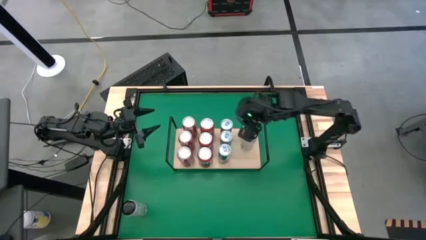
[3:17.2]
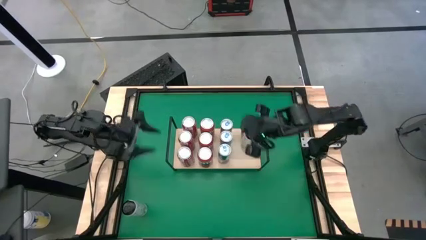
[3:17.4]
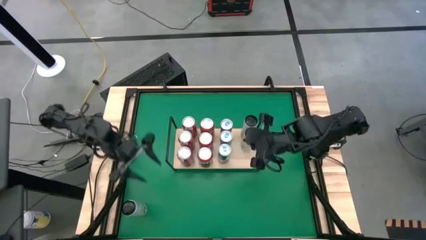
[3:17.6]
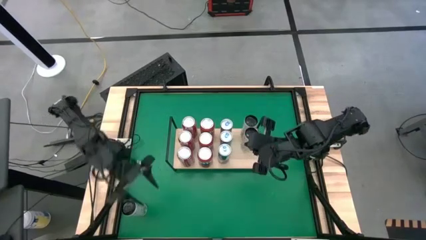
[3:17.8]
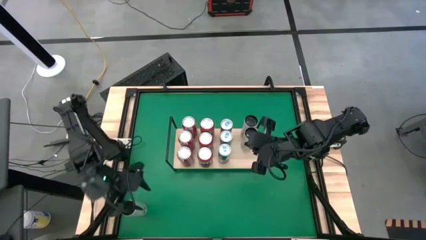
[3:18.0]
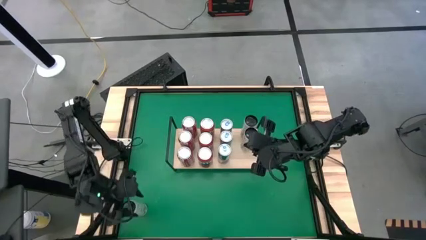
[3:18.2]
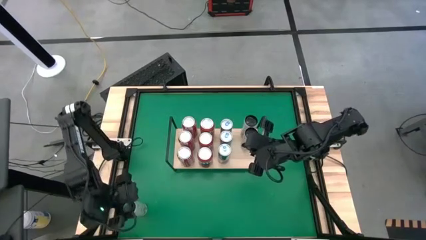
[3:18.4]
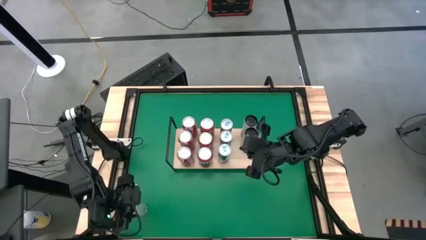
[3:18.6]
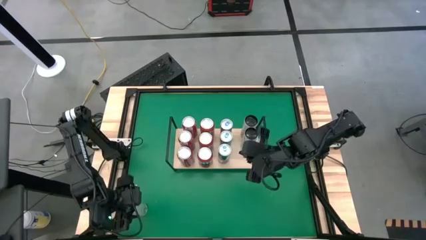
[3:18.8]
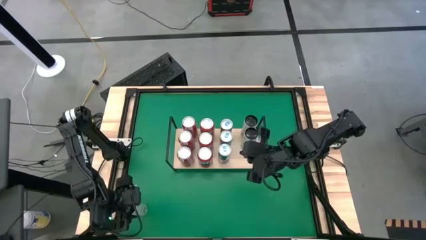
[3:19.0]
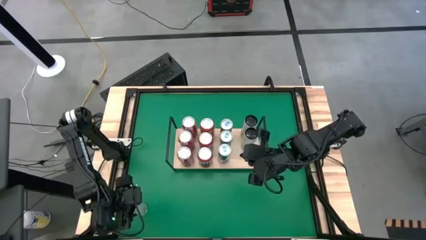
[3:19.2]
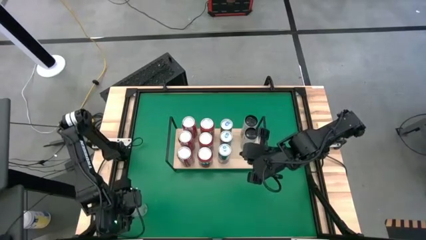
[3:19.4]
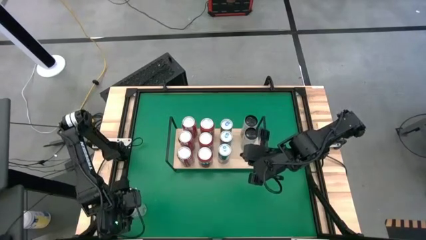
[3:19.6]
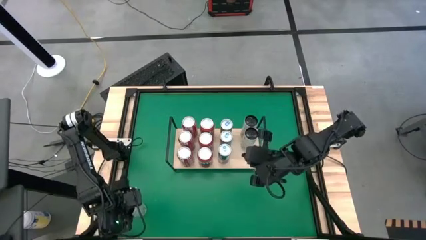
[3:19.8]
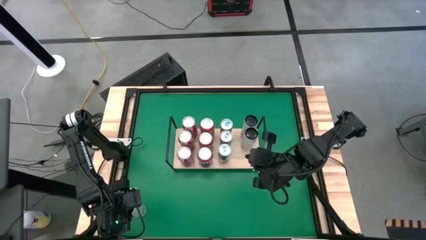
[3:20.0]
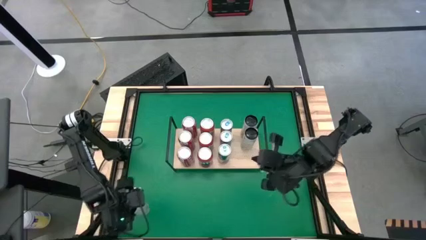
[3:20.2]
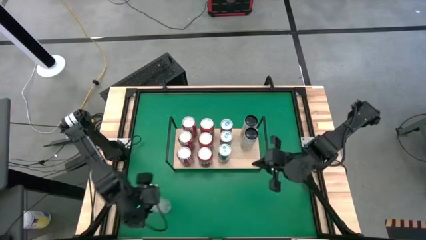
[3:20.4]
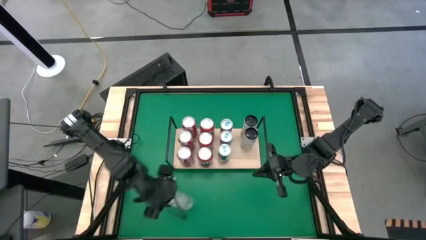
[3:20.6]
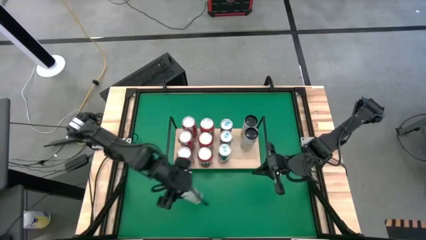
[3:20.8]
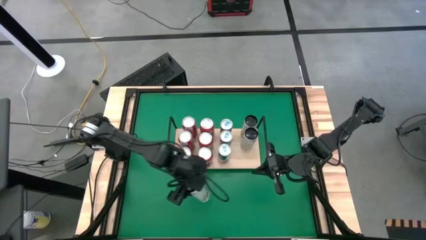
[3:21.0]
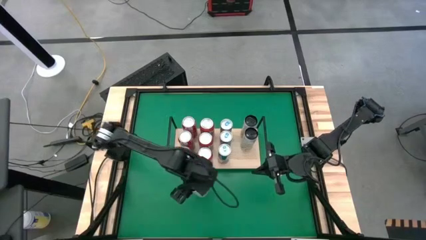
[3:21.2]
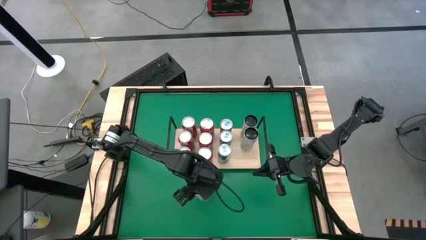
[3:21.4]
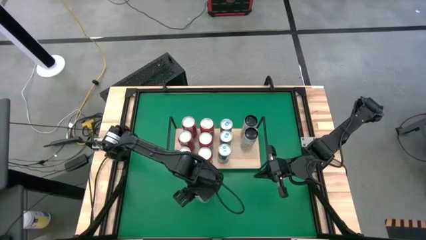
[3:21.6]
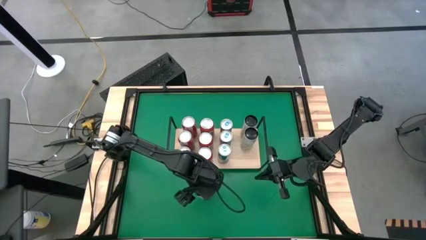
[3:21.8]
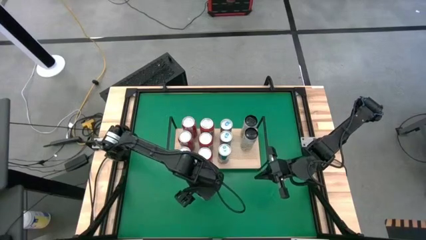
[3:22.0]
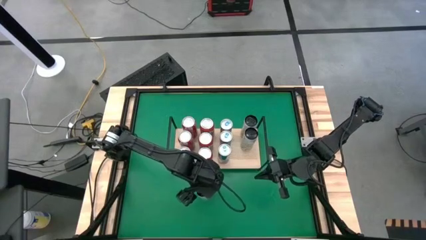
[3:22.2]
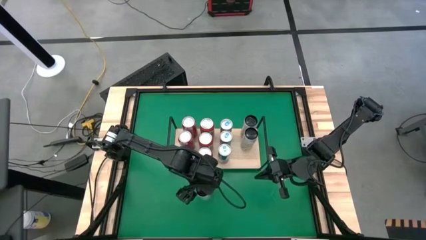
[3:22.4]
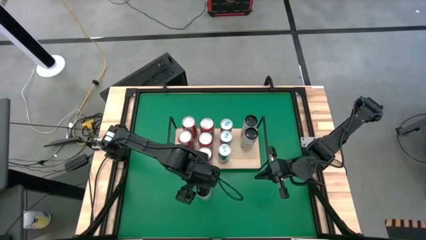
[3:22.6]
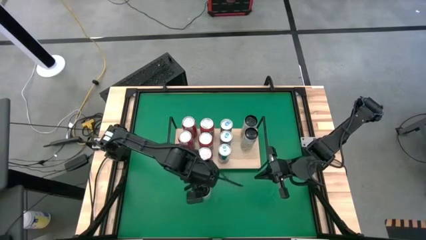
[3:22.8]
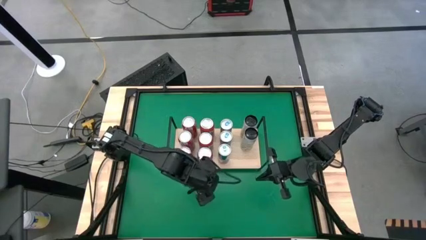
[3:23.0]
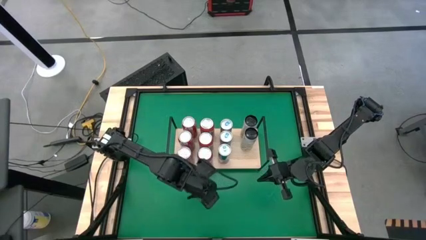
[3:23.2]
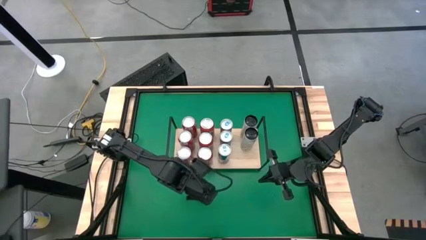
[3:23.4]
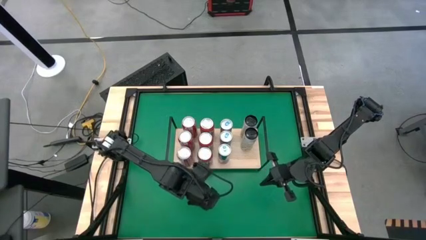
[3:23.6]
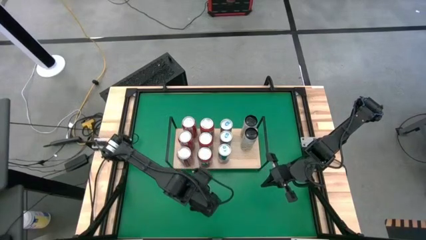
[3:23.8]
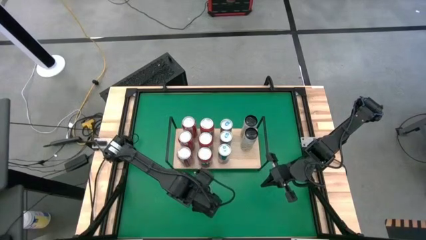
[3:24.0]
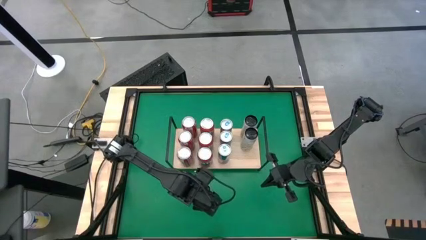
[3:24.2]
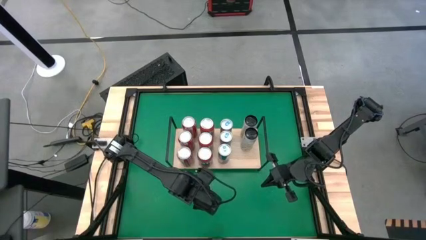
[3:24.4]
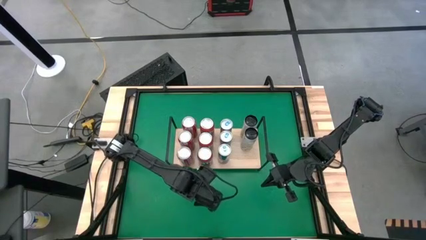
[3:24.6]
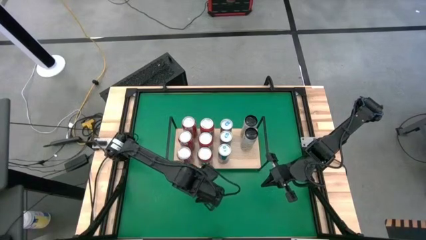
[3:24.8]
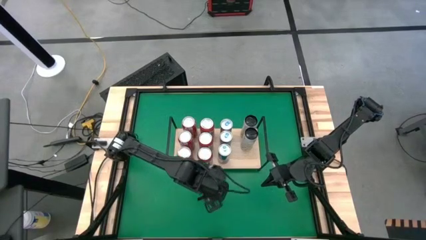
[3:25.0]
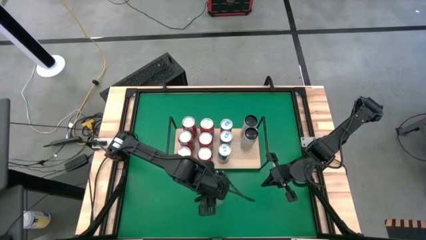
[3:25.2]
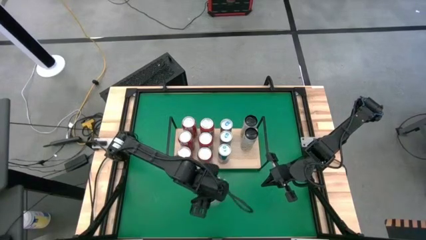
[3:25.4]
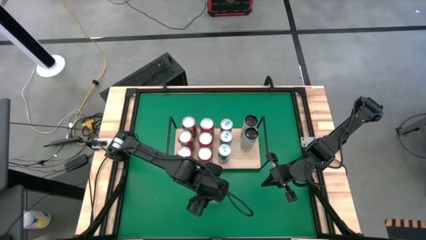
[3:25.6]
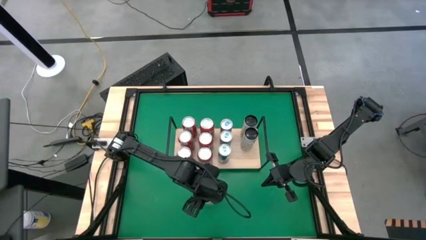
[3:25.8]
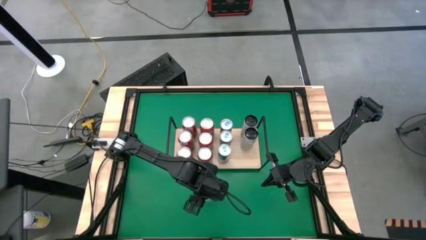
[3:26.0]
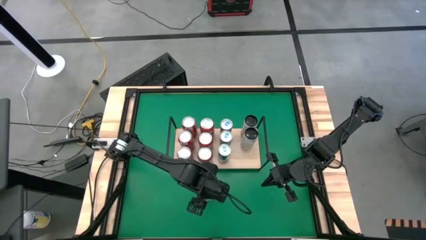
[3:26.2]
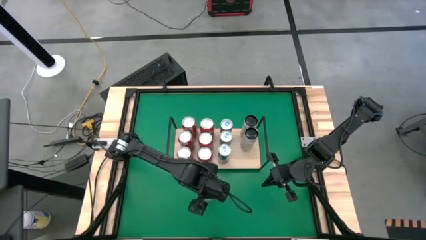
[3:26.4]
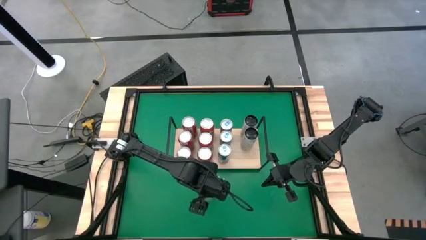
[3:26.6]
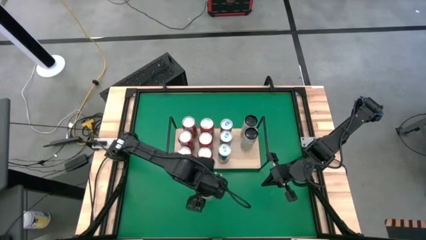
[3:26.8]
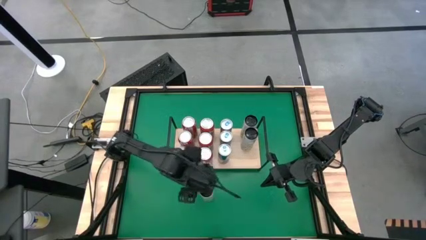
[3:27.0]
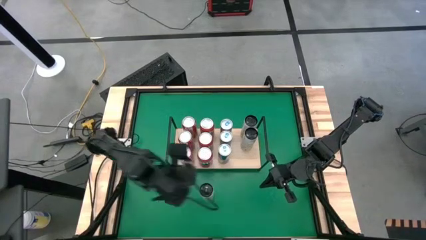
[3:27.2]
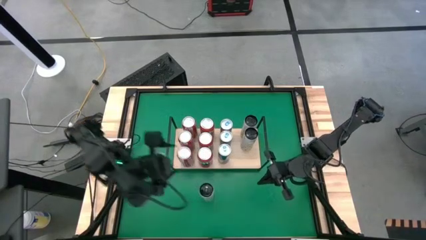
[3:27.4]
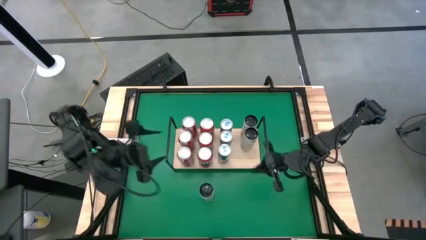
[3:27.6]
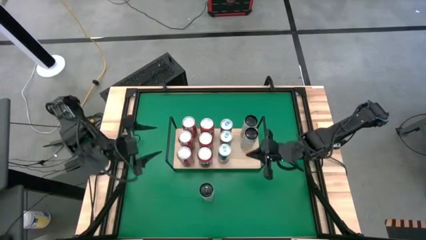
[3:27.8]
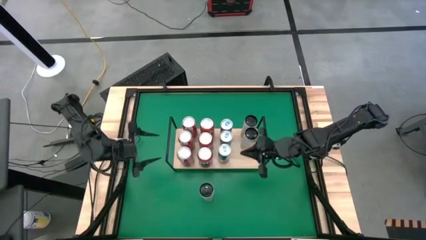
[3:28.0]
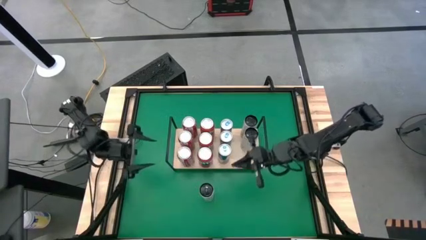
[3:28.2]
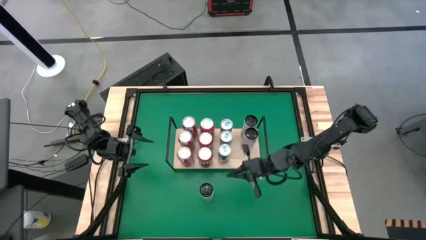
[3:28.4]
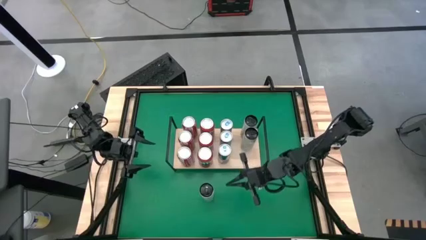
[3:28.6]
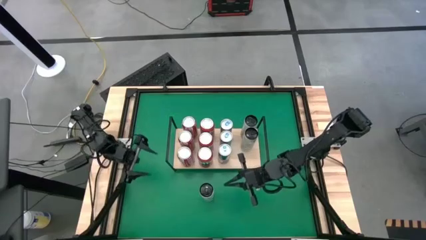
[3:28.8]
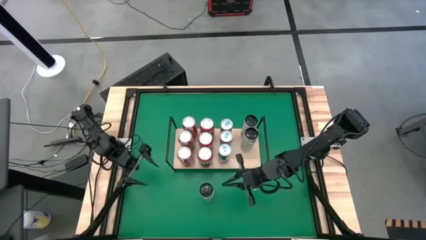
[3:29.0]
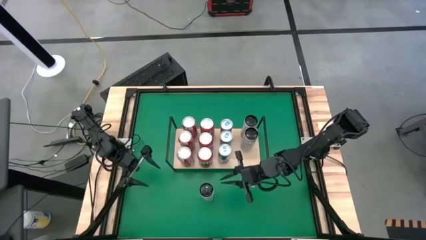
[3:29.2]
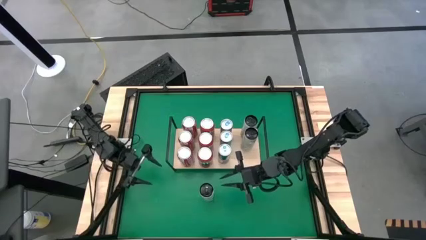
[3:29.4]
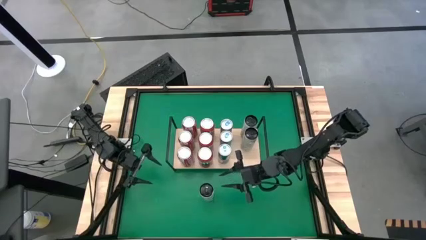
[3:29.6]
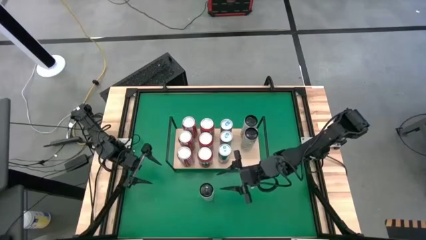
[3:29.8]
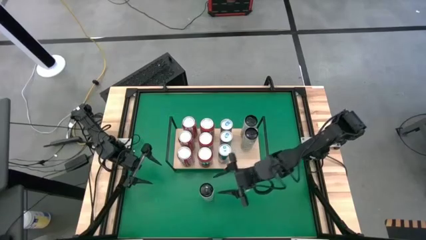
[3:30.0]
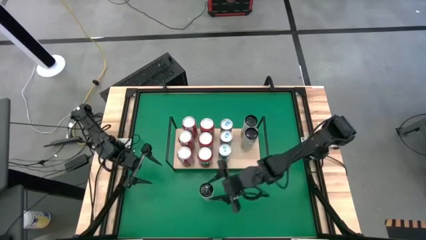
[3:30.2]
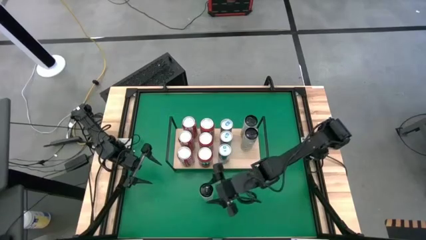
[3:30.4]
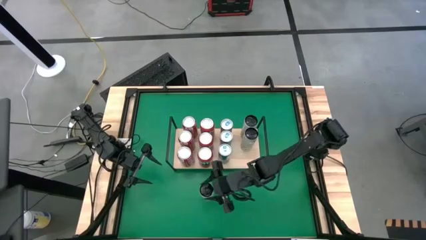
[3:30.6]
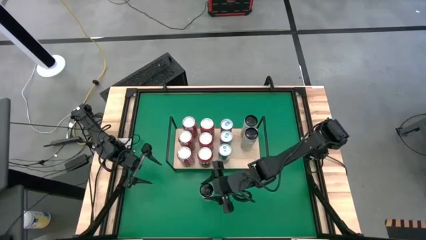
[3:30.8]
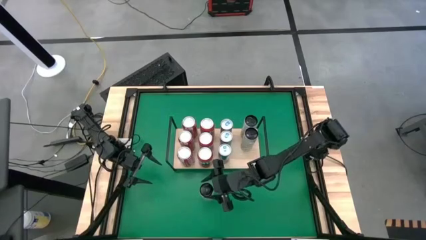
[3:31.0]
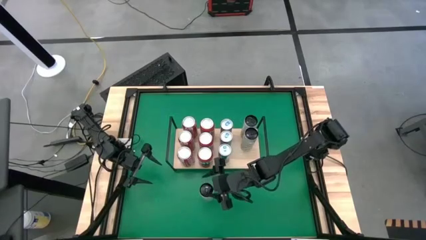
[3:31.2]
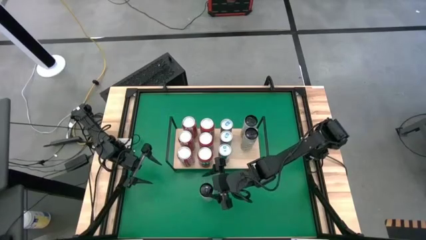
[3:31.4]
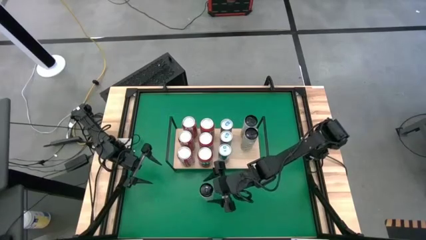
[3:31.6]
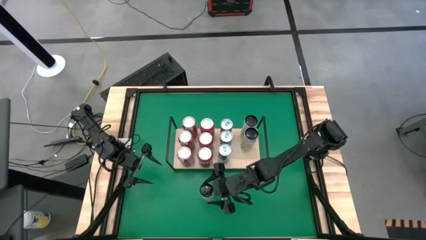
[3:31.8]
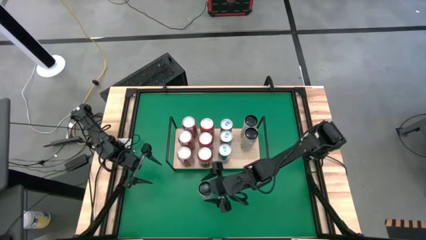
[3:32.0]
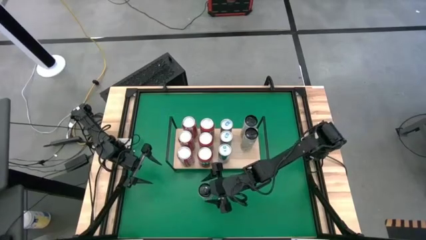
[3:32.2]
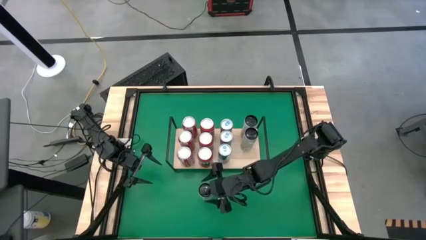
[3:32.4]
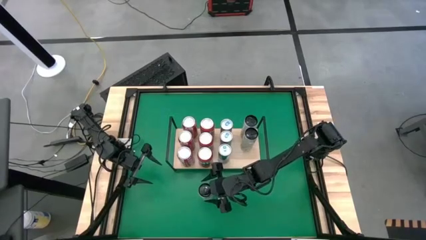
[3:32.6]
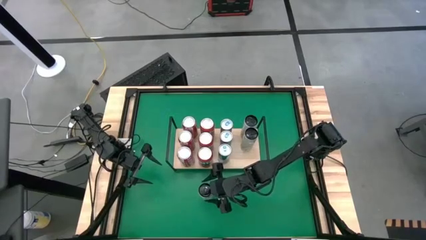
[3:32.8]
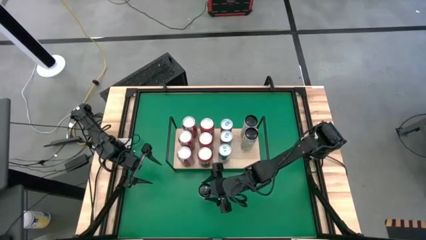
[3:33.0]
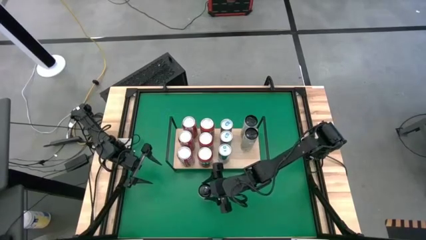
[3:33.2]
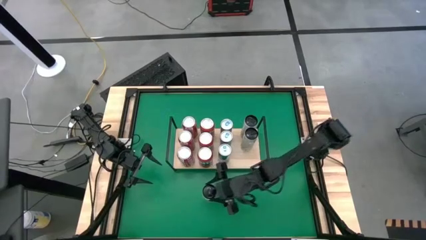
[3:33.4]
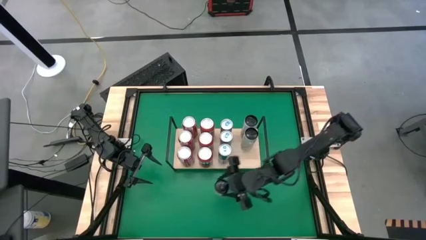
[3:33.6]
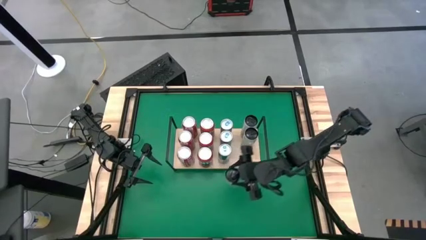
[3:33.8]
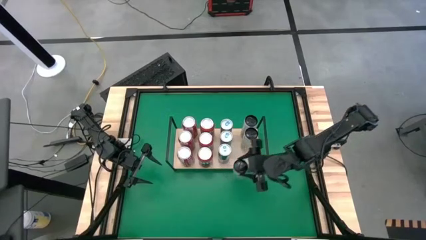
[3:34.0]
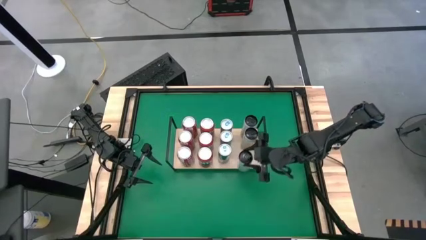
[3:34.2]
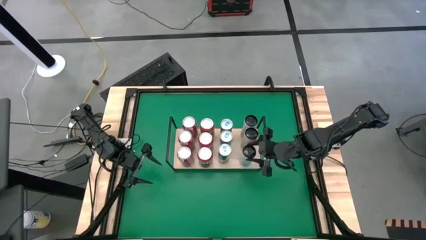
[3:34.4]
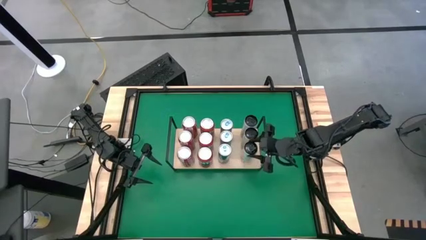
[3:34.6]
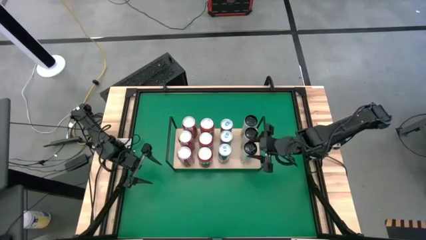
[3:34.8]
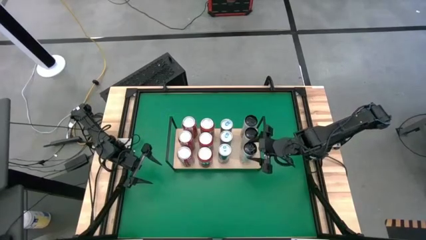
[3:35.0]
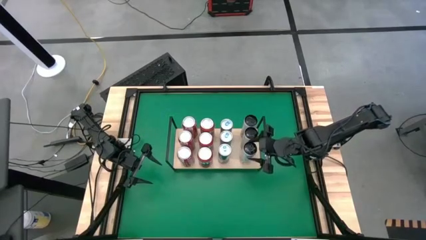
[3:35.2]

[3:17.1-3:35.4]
Task: Place canned beverage on shelf
Put the white-yellow soda can on the shelf aligned with the other white-yellow soda cans
